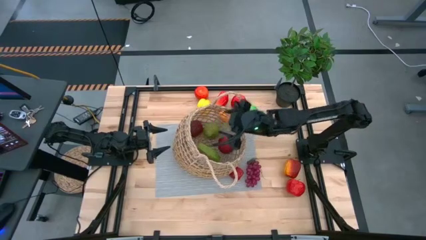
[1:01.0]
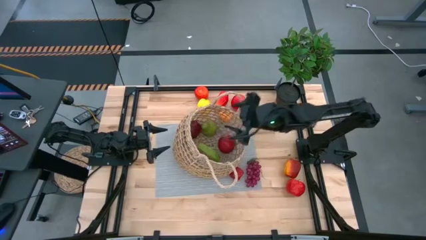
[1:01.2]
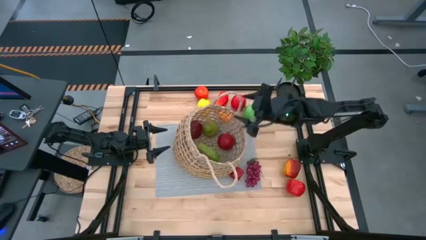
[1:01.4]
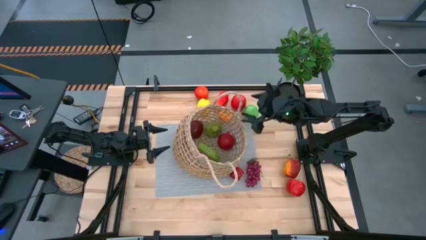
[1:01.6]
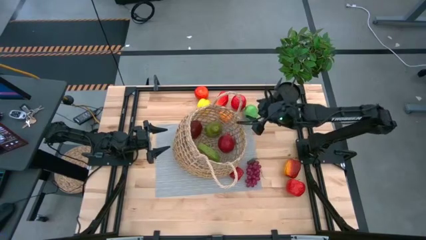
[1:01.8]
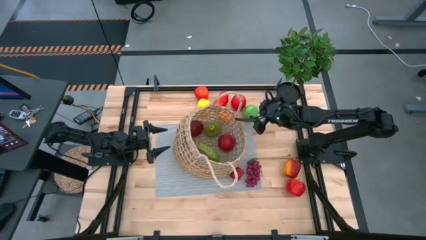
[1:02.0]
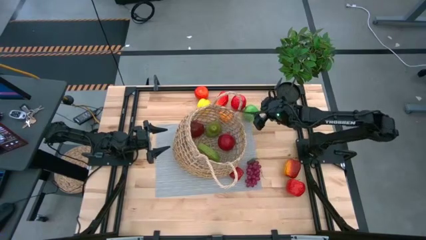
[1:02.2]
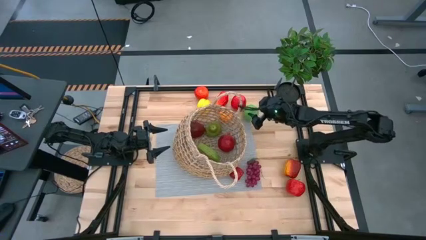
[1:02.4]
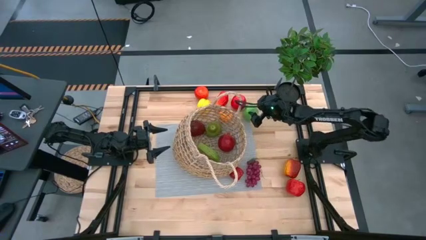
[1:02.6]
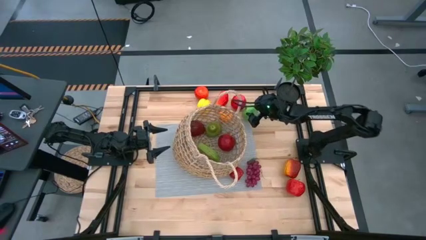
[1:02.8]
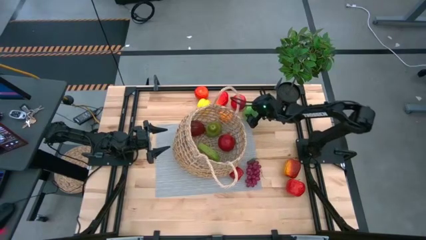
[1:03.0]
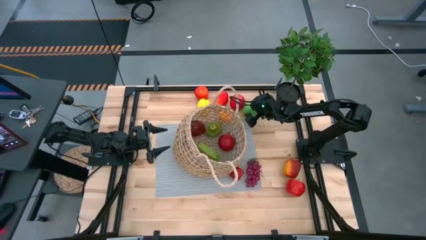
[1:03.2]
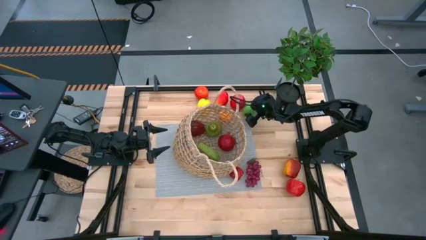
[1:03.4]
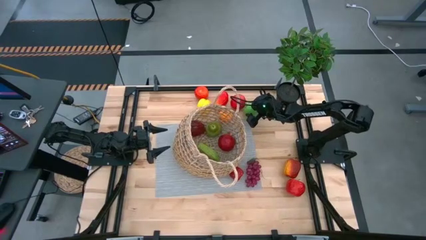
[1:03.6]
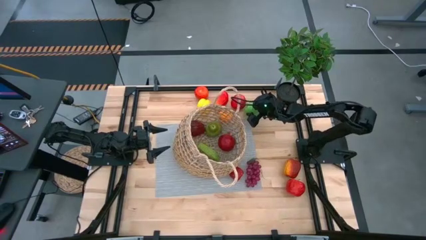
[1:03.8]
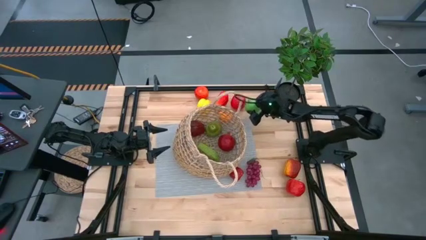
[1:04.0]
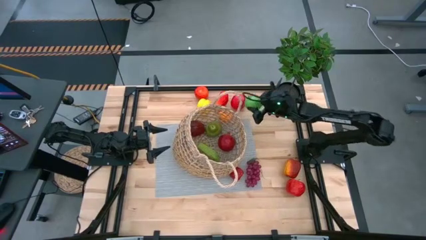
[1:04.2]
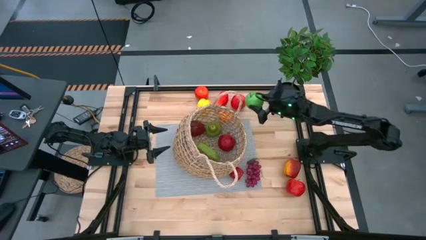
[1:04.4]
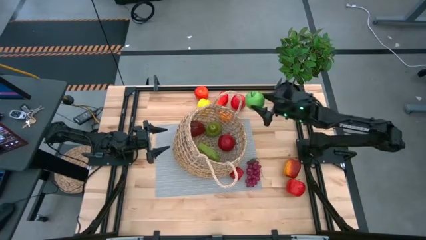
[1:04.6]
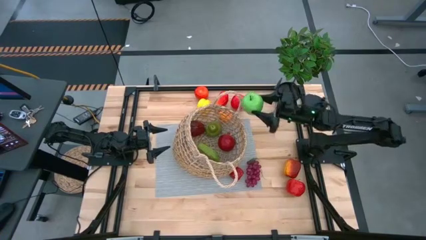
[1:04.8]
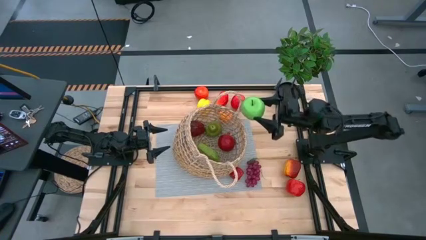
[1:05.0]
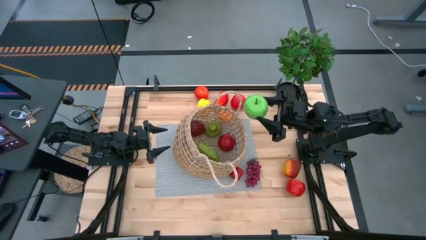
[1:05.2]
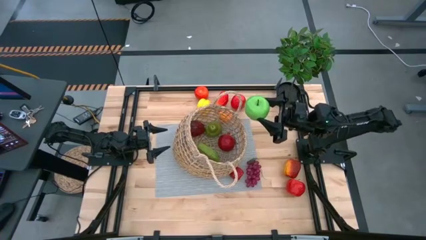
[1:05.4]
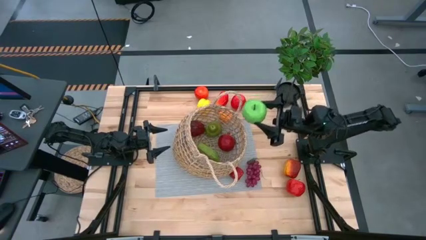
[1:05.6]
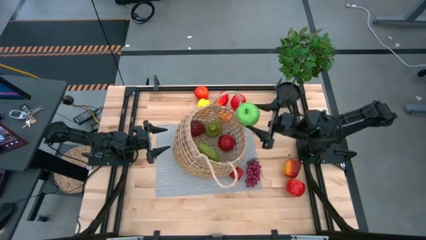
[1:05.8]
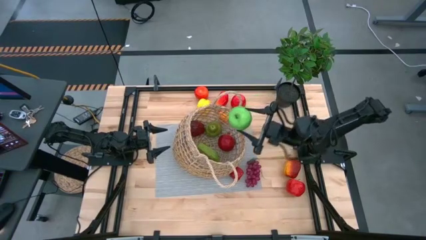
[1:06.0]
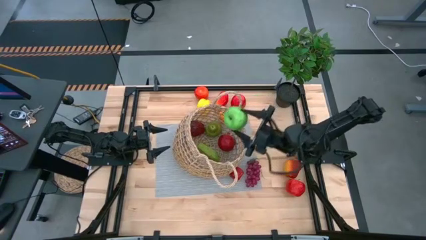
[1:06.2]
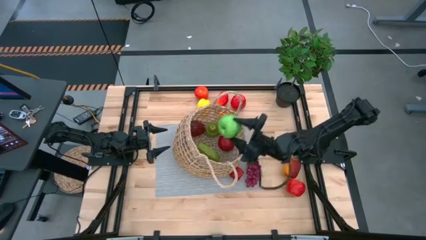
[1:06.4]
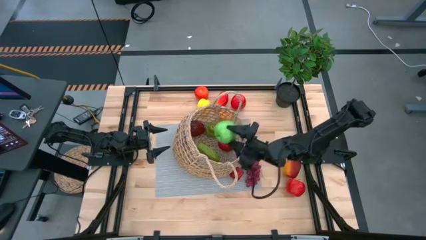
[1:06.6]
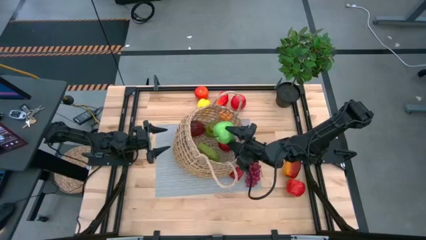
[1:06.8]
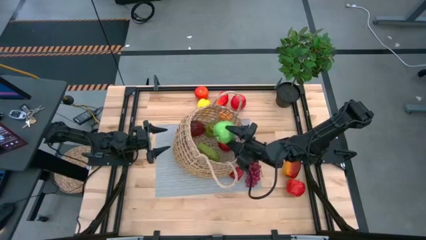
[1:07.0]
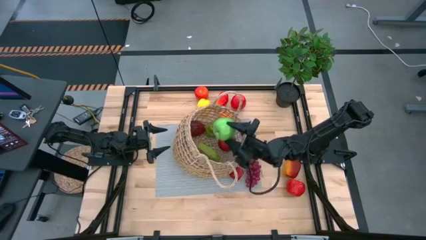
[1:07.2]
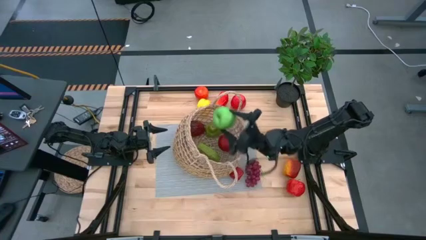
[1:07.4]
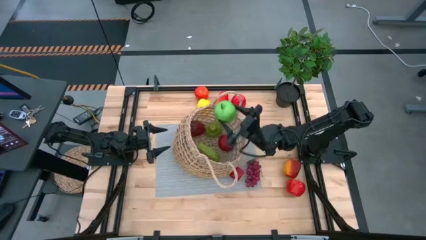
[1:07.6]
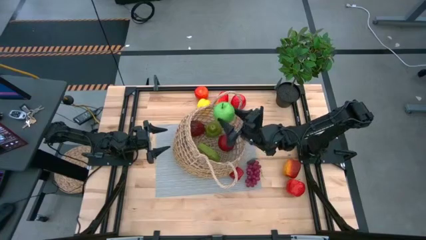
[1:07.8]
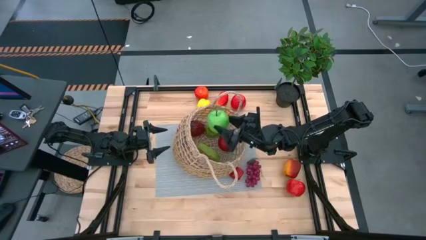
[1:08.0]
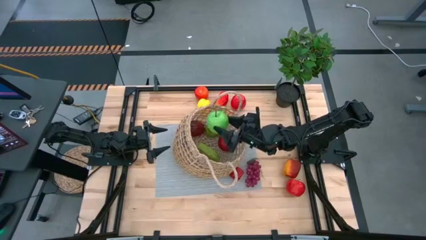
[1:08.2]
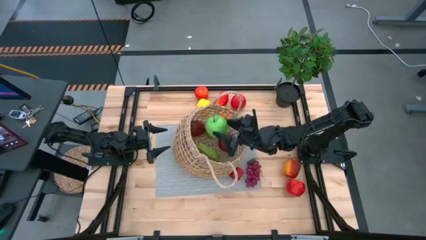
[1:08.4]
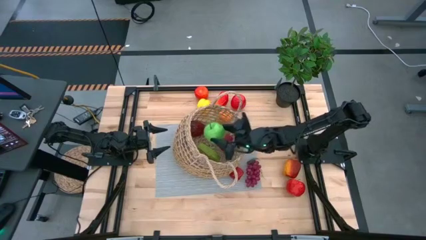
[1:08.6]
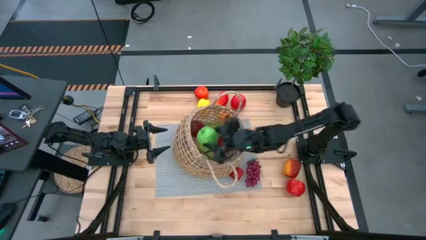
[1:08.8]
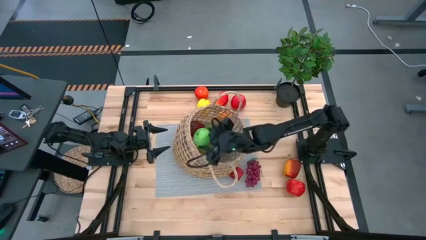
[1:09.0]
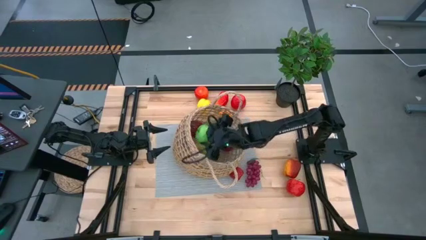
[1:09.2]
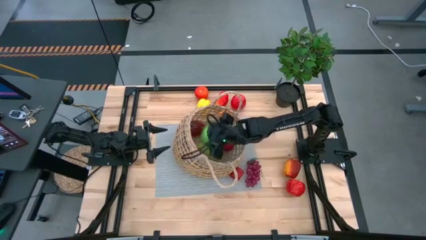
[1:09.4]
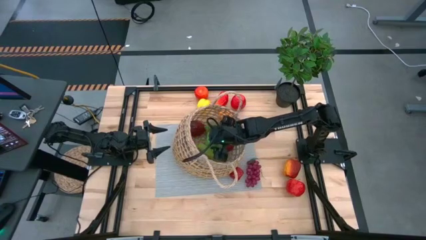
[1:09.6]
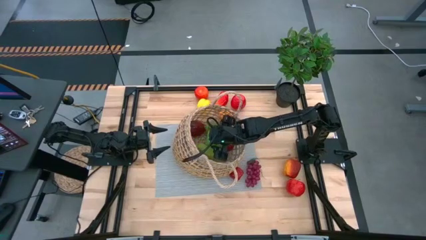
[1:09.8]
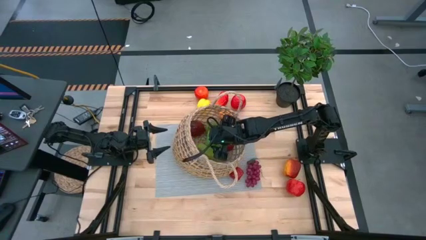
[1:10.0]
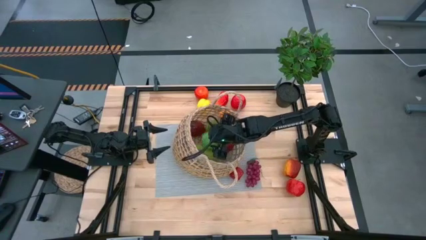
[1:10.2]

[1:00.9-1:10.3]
Task: Build produce basket
Put the green apple into the mesh basket

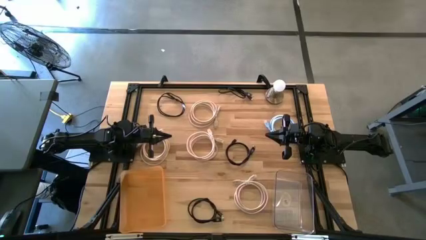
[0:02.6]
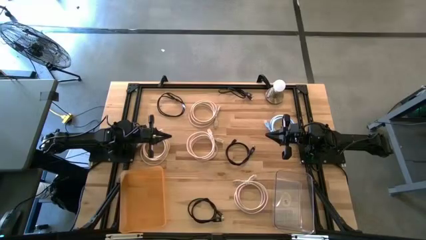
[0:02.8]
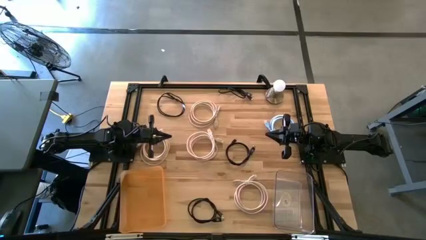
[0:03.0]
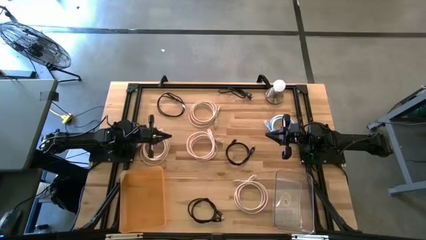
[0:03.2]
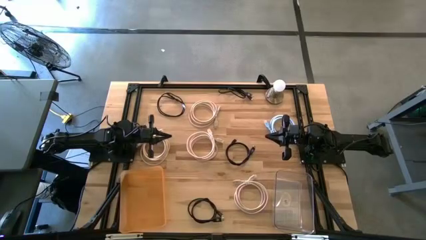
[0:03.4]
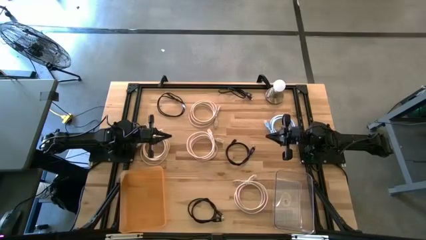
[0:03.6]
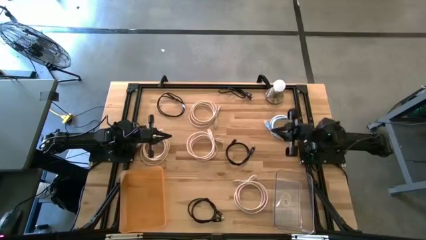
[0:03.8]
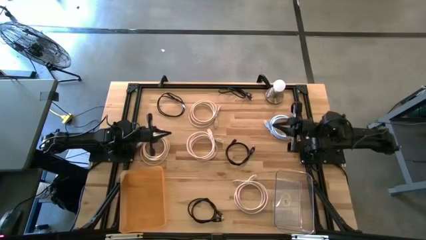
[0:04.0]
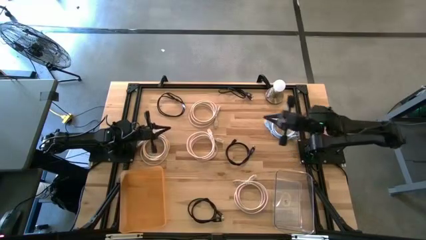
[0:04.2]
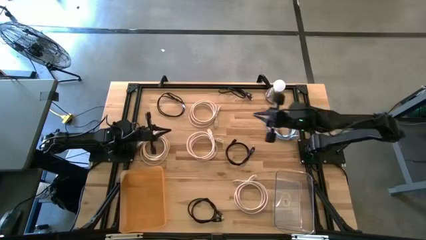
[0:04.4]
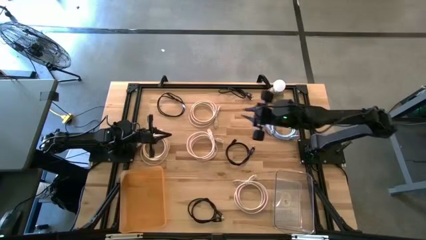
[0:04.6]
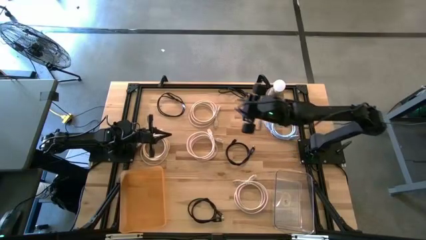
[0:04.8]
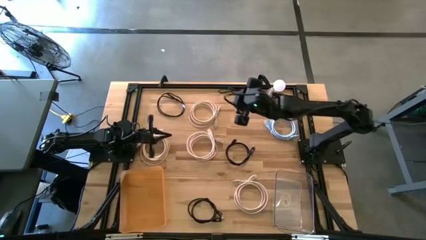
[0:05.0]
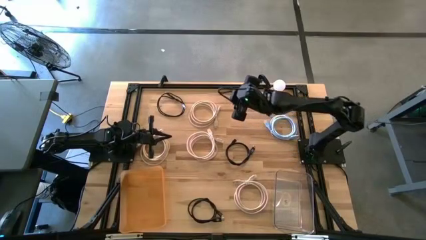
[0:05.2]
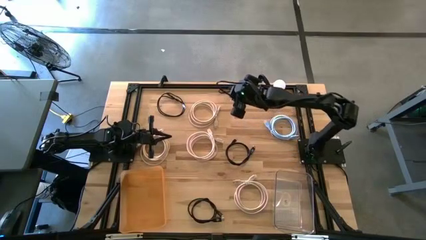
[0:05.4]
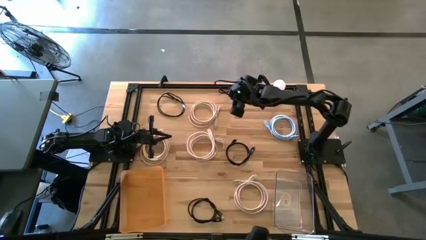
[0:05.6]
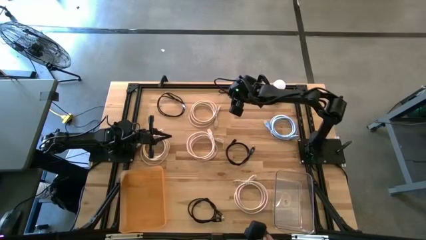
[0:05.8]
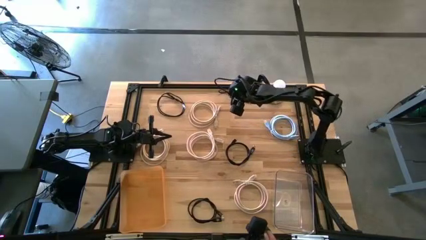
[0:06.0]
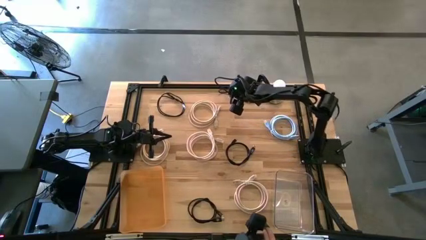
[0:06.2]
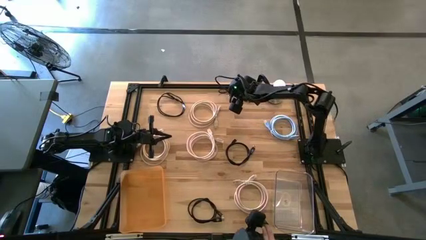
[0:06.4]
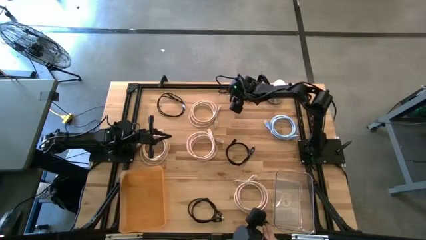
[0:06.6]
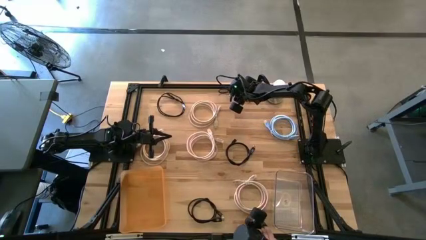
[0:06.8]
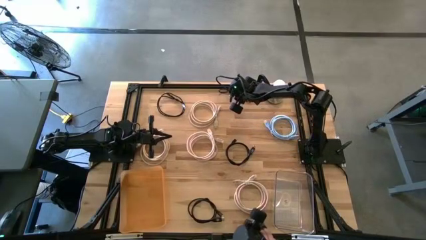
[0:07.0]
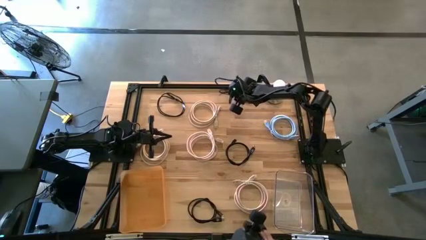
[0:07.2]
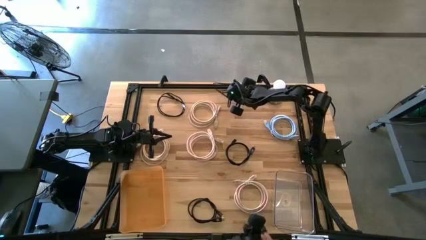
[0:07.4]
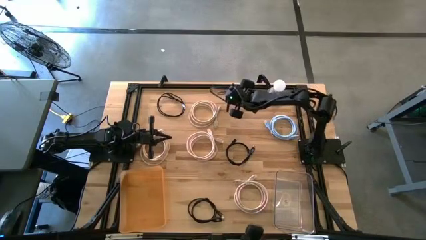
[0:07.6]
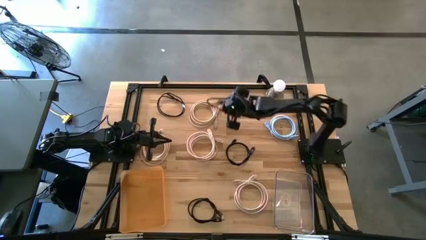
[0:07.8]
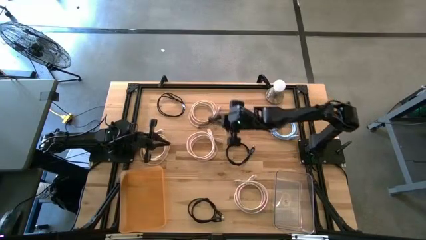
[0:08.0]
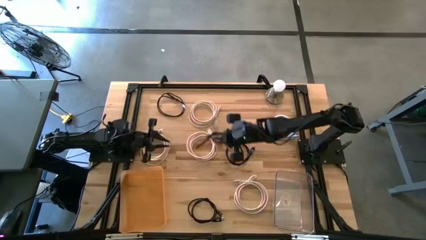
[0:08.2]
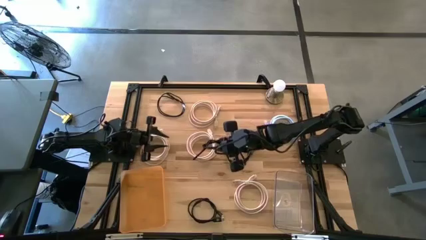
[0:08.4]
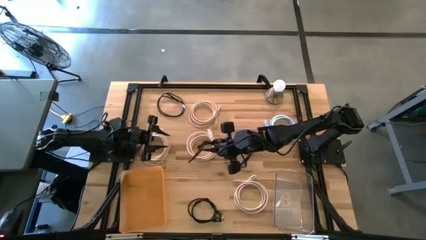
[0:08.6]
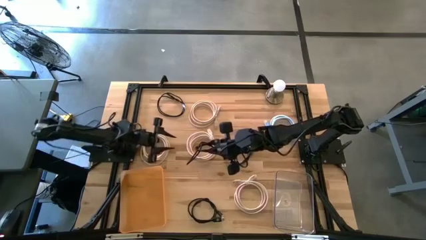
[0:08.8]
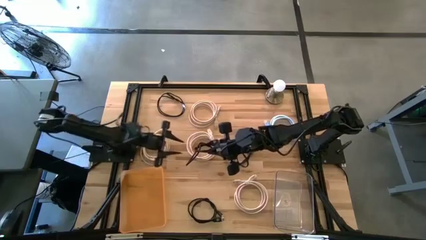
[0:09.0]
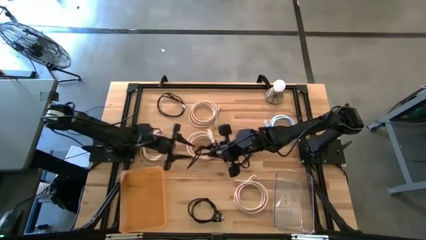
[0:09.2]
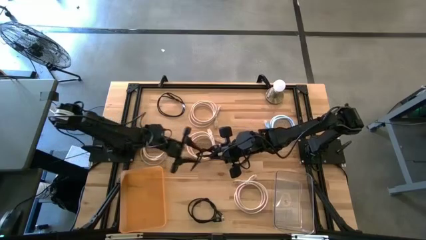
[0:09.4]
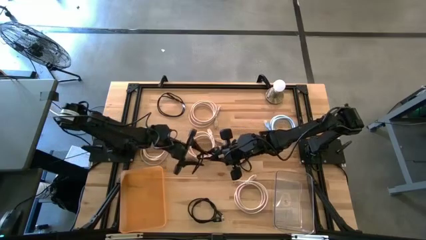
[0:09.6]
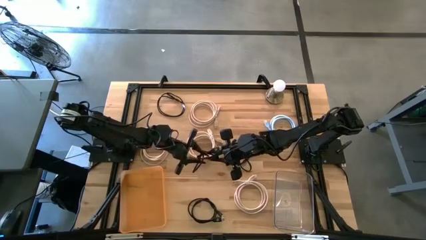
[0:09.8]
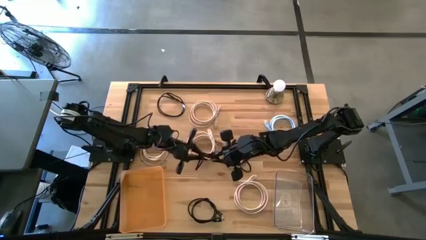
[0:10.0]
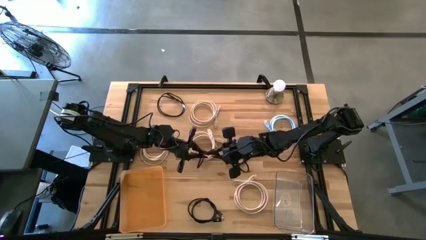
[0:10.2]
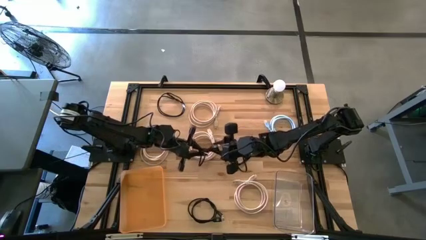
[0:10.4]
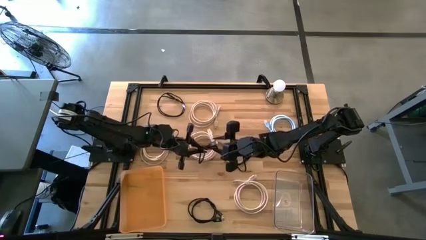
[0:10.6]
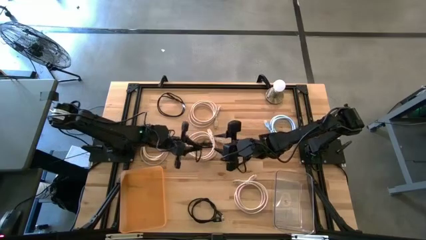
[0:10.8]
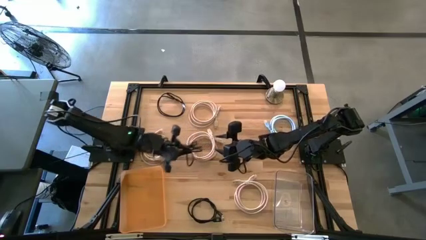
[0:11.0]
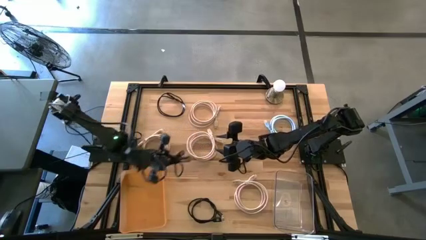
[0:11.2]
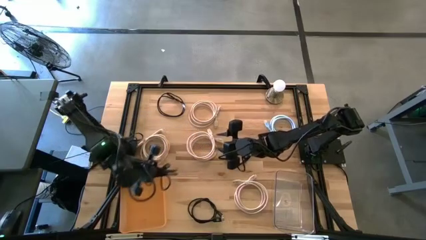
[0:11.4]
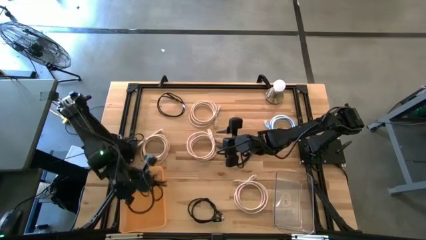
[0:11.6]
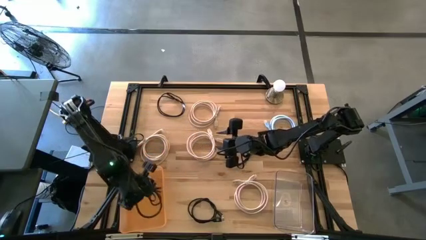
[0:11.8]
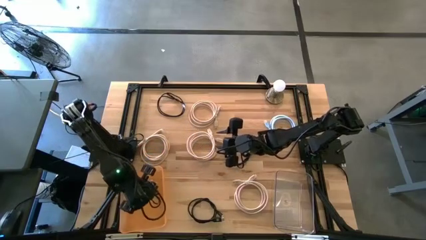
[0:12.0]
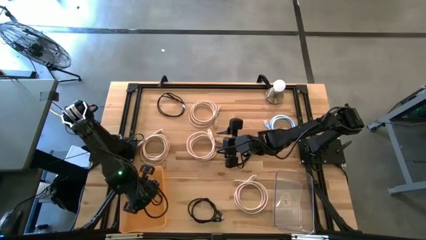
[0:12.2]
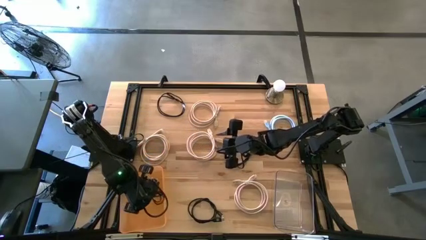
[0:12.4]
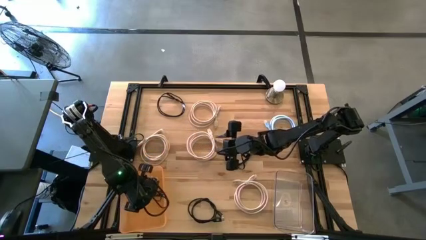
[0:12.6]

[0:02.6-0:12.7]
Task: Sort HDMI cables
Put the black HDMI cable into the orange bin
